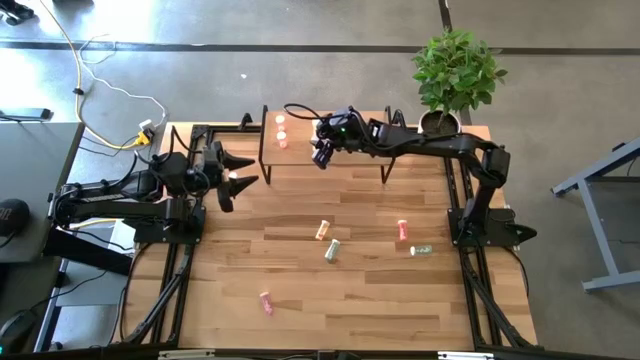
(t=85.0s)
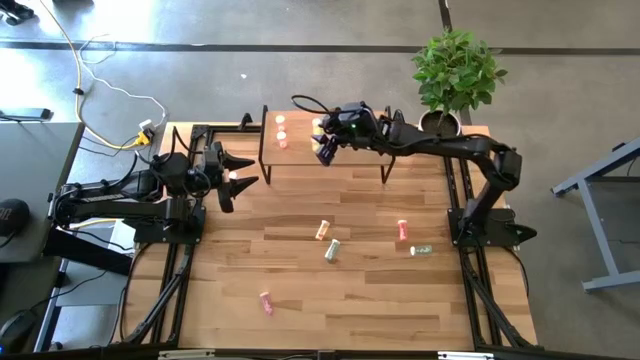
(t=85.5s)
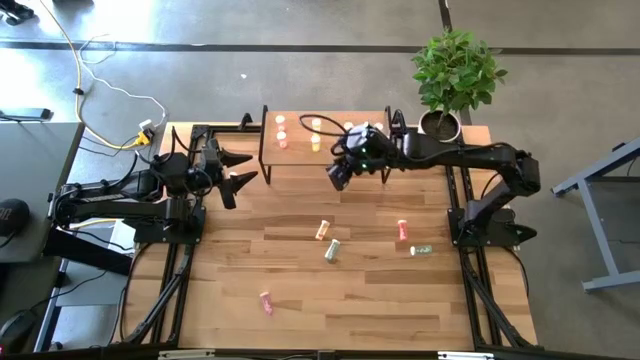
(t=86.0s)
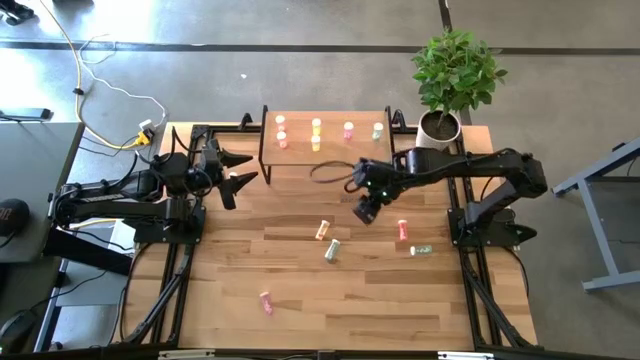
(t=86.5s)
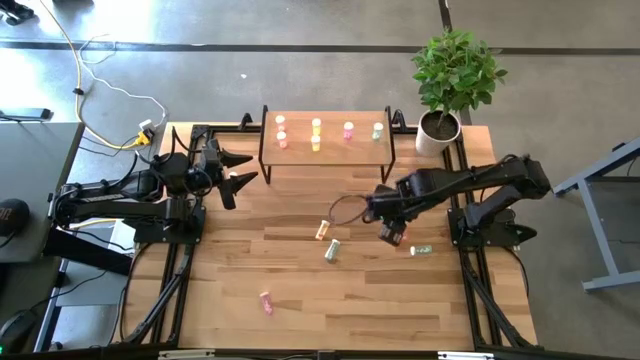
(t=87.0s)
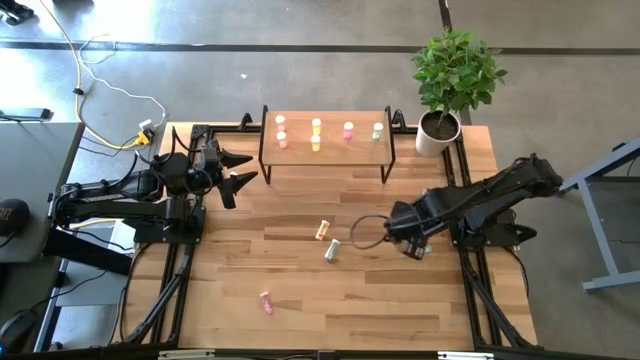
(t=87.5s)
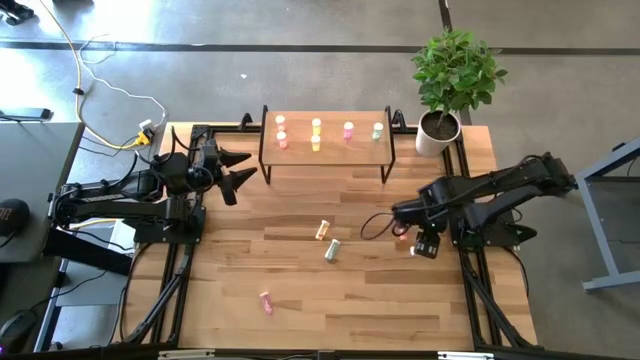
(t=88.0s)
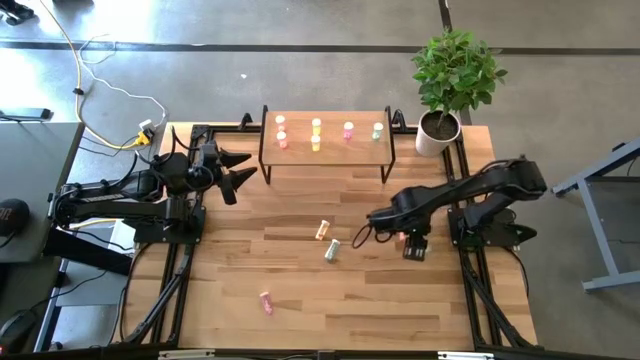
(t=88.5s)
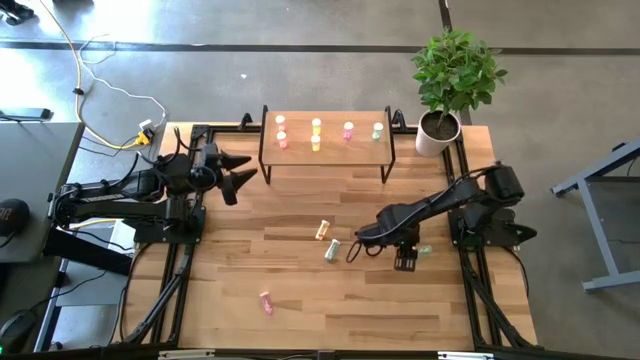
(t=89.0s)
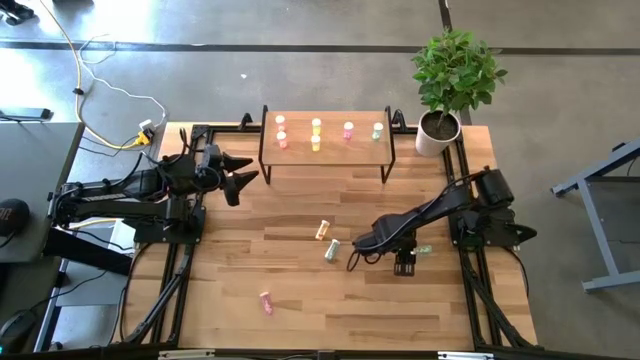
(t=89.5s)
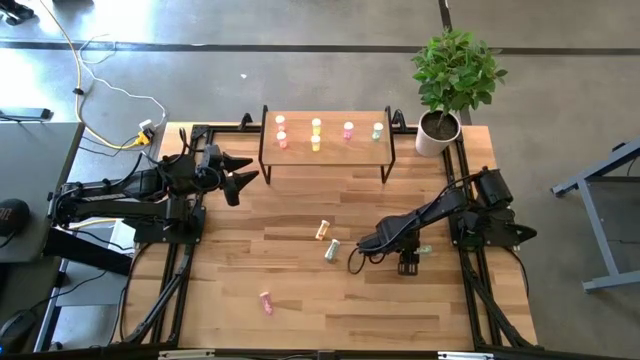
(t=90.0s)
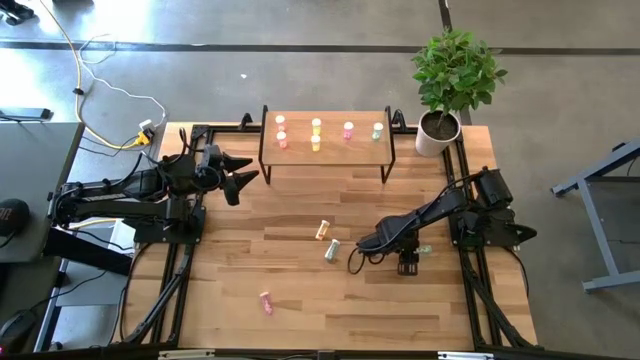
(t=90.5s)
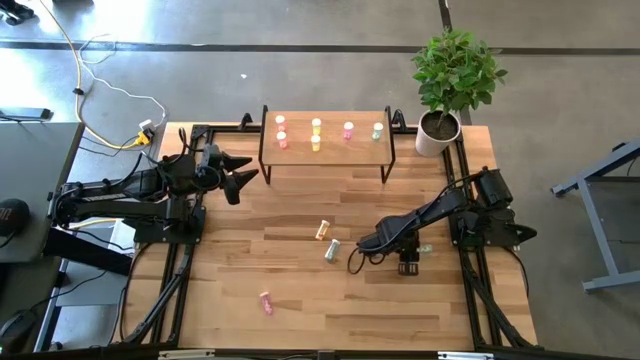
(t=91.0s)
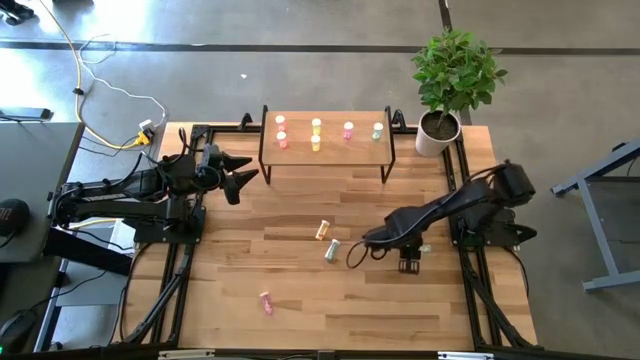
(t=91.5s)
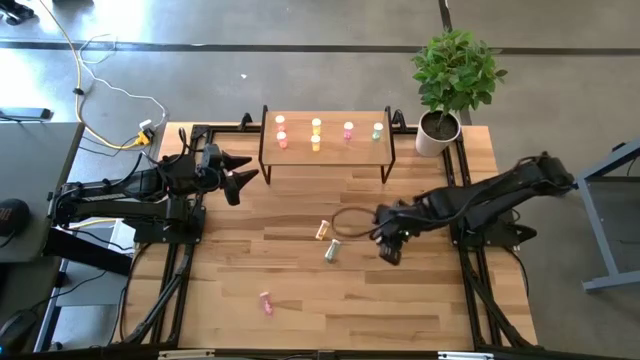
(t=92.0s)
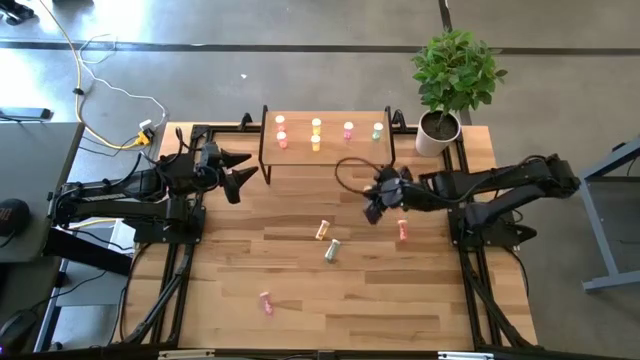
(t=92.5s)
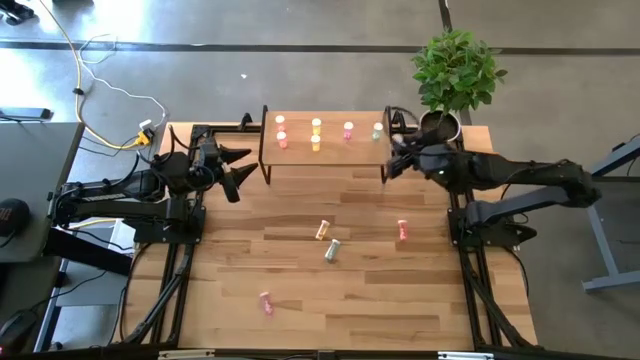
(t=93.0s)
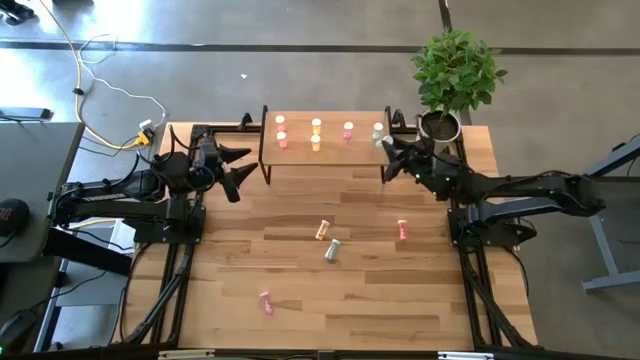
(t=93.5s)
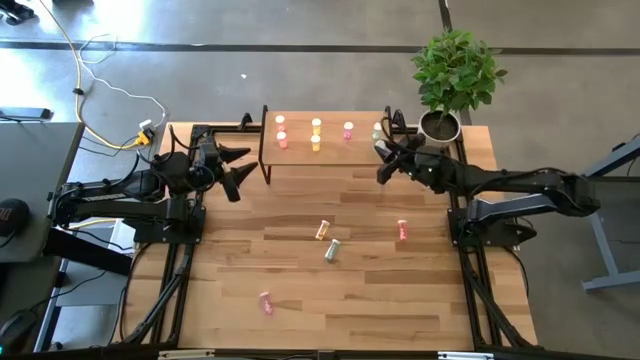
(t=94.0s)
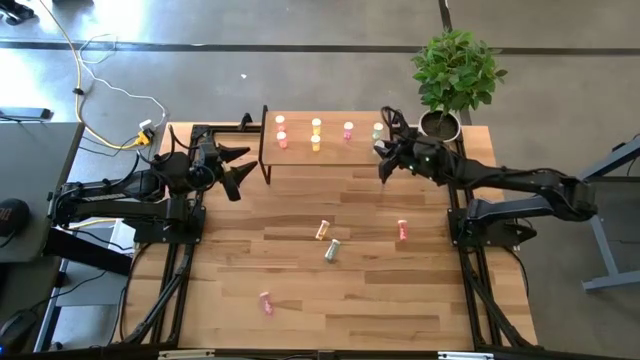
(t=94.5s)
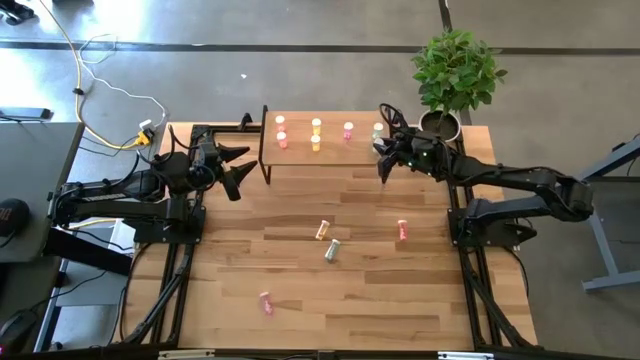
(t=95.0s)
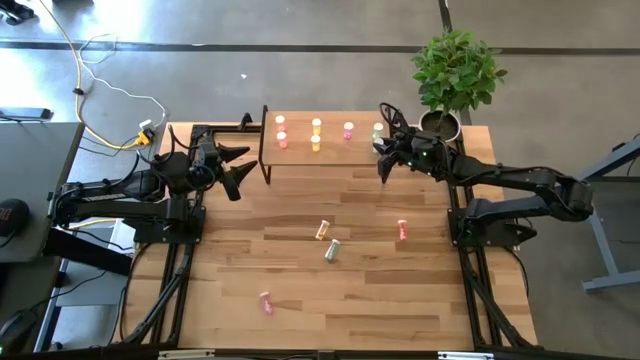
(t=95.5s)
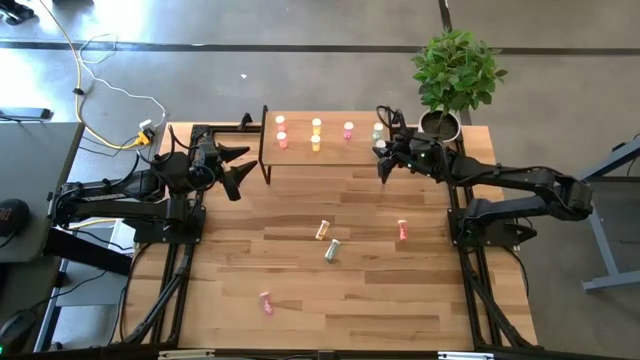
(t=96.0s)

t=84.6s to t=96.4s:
Task: Pick and place medicine bottles onto shelf by color
Put the right blue pill bottle on the shelf aligned with the blue pill bottle

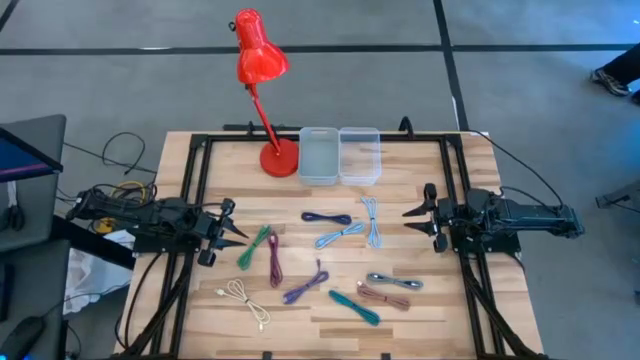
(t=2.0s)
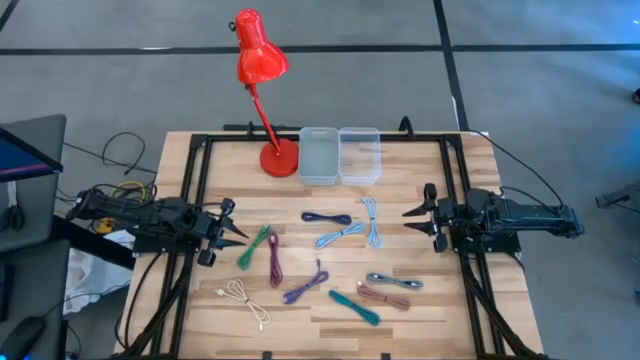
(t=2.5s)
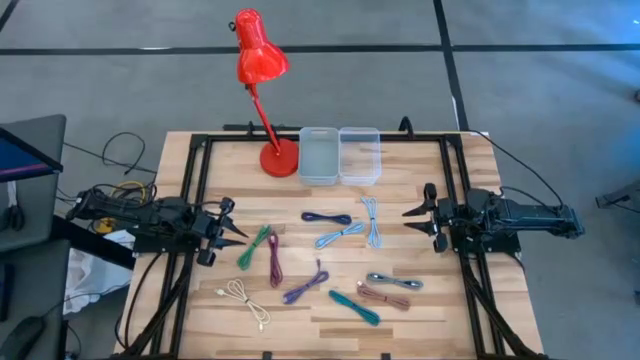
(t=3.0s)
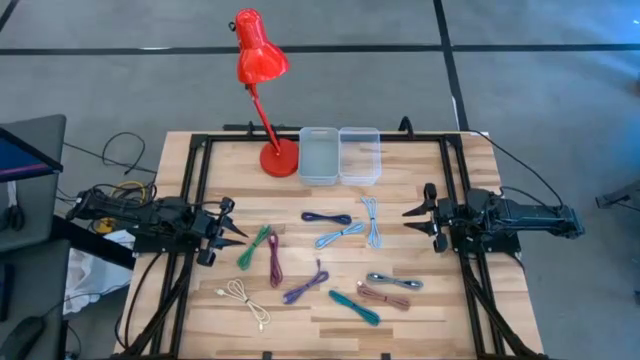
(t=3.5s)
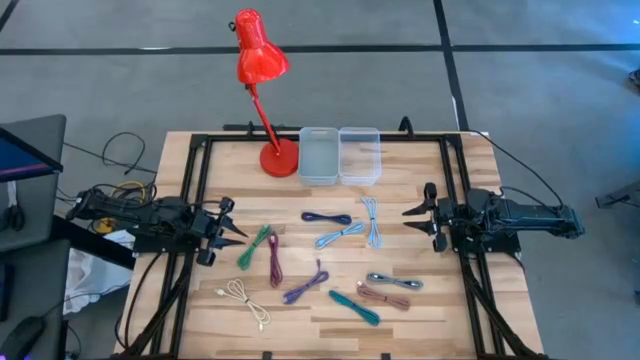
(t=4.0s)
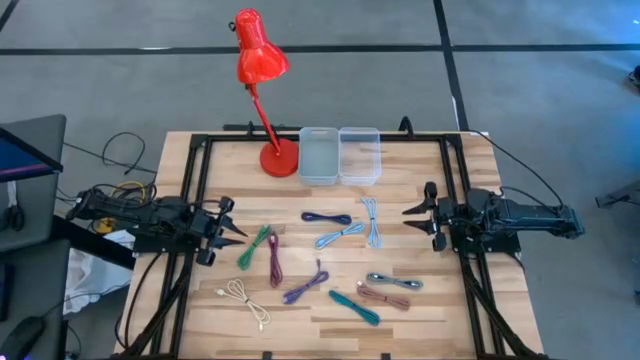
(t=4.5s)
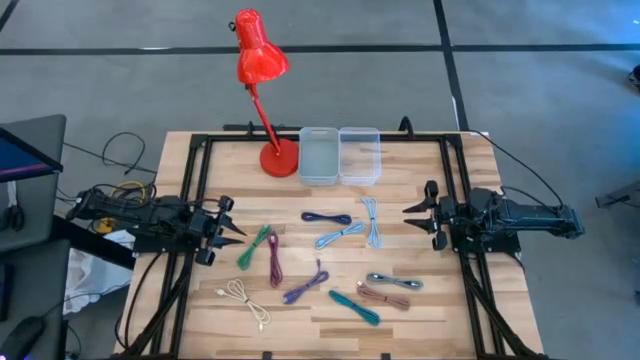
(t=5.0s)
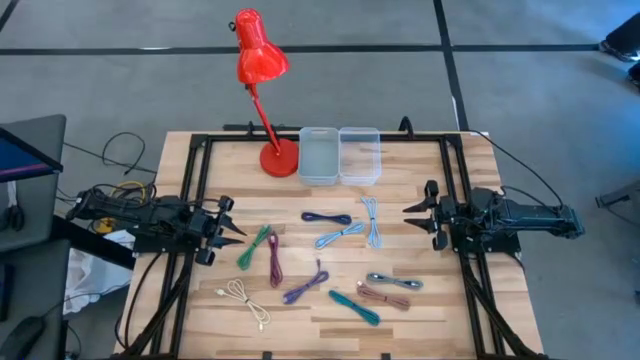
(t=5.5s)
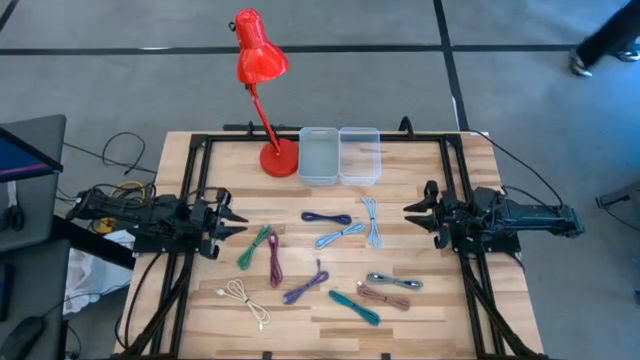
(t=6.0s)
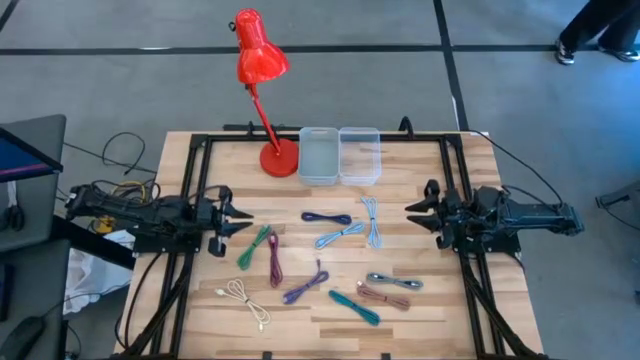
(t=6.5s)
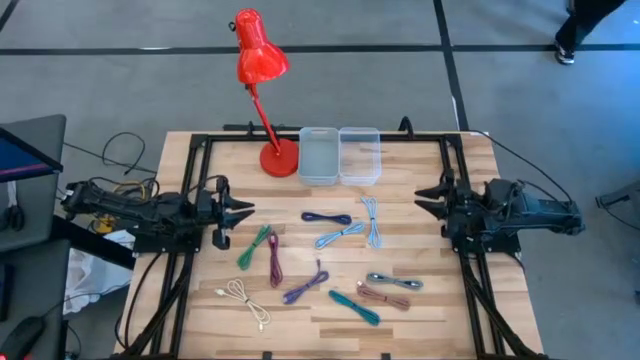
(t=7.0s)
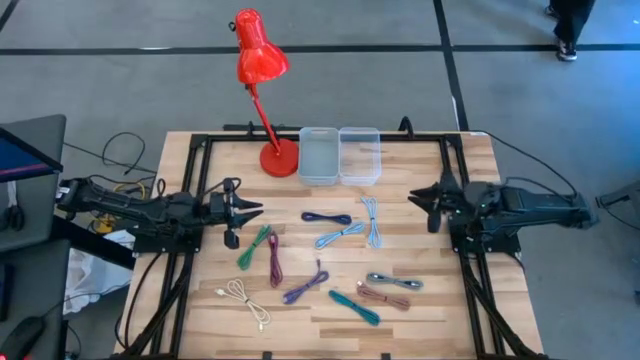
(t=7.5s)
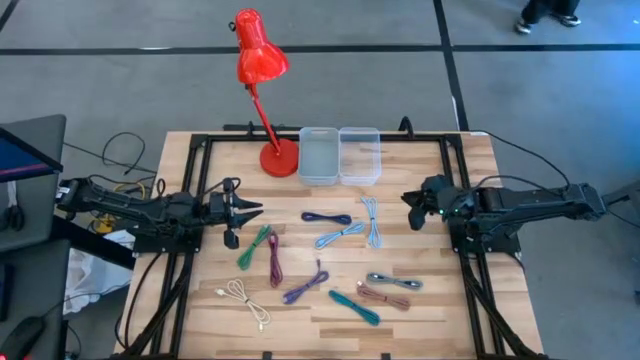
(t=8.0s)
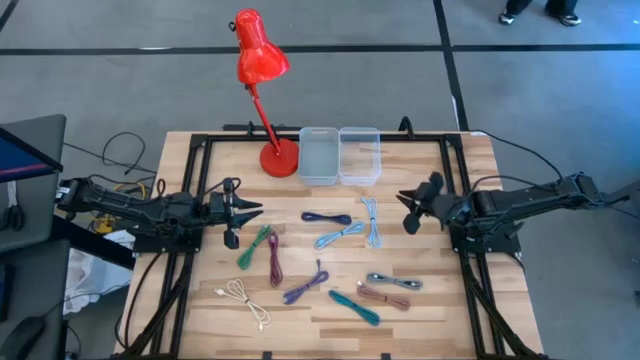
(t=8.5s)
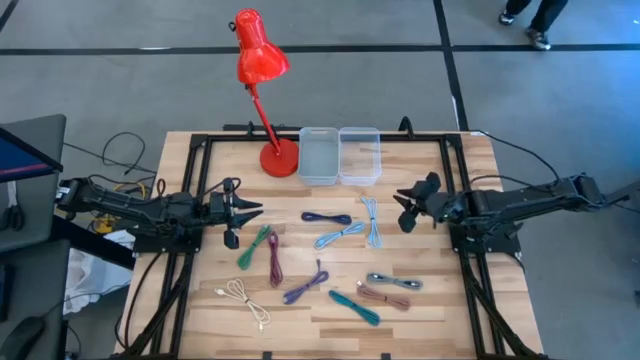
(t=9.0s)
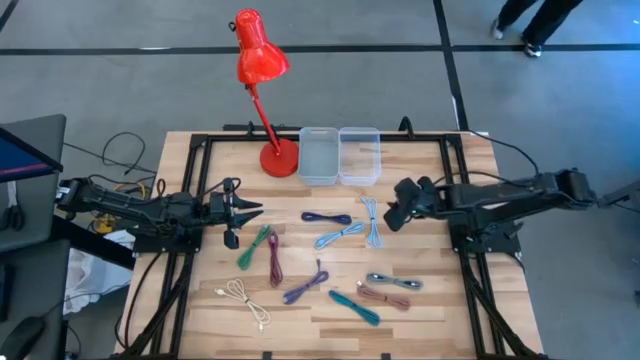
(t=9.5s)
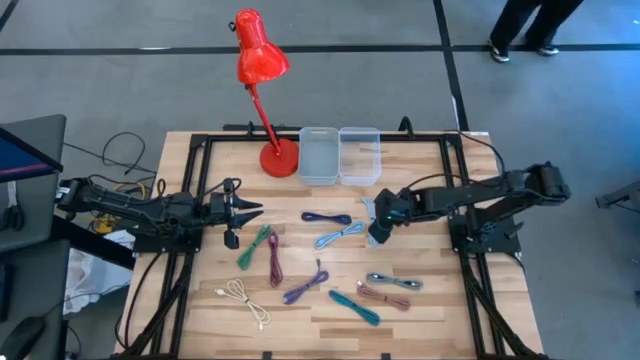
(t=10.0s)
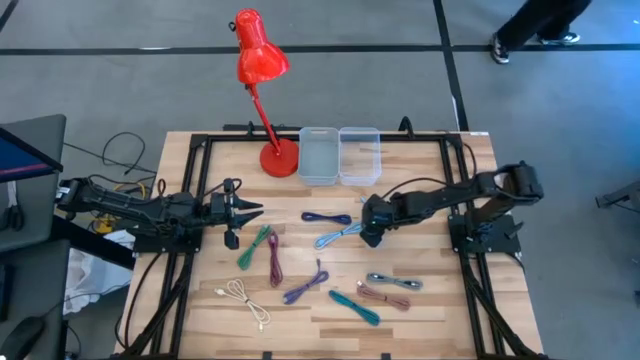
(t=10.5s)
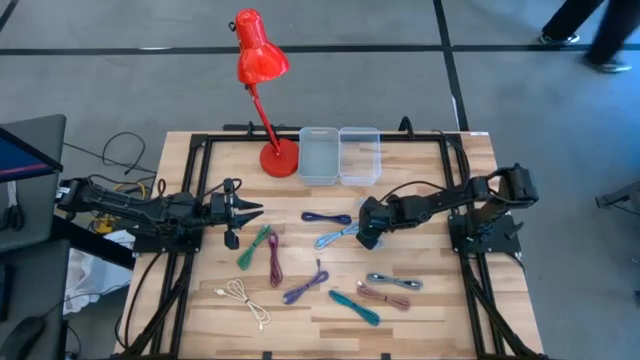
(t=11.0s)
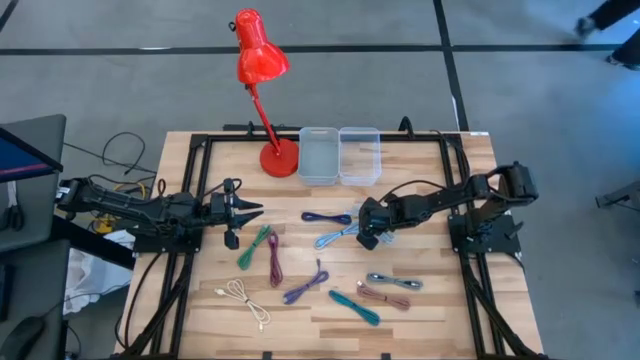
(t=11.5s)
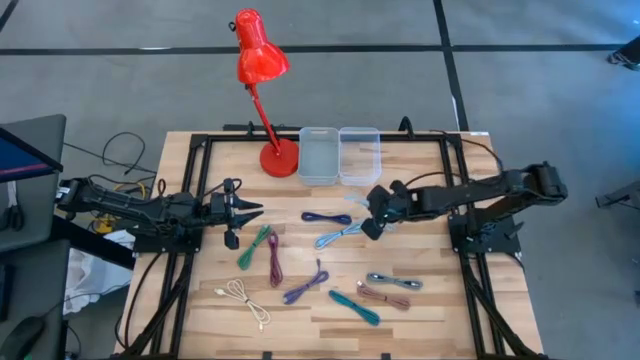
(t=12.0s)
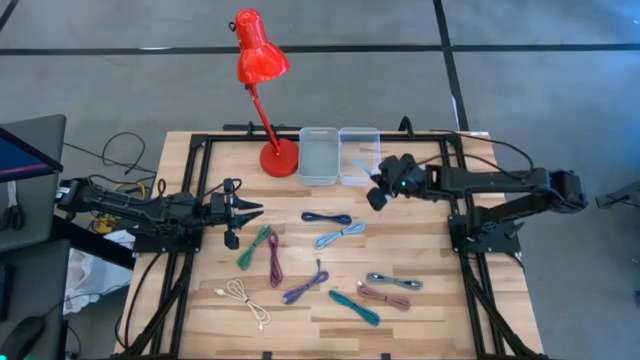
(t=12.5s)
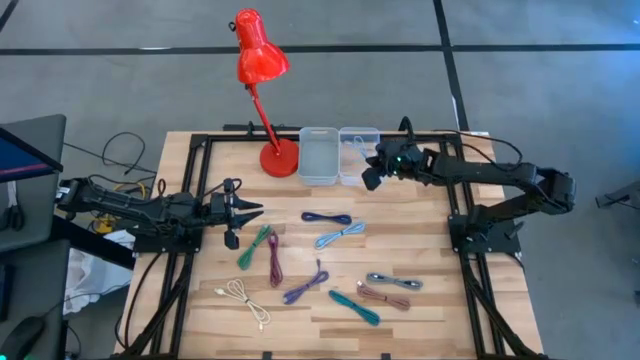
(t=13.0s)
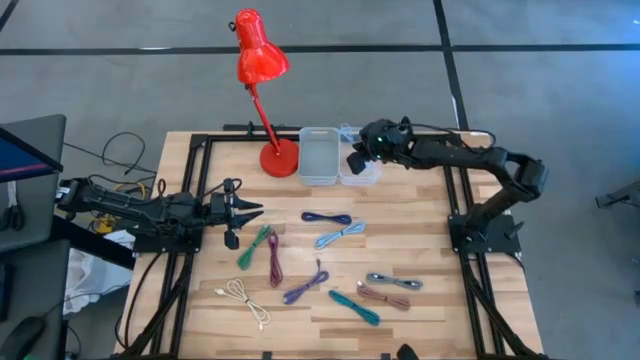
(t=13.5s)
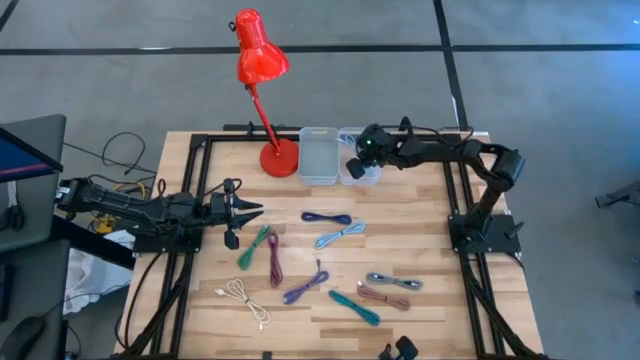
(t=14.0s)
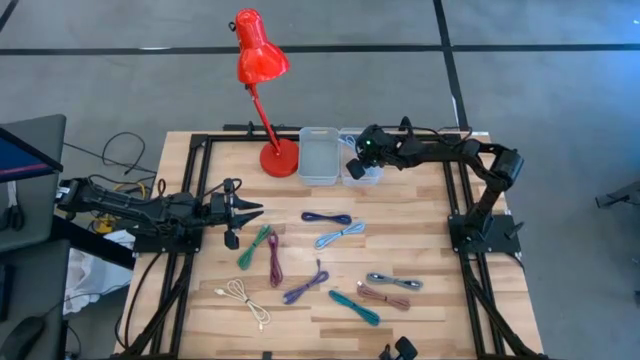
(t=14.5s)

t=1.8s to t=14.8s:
Task: Pick & Place USB Port
Put the light blue charger cable into the transparent bin
